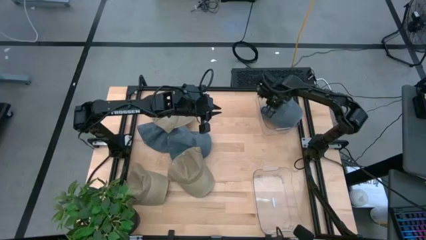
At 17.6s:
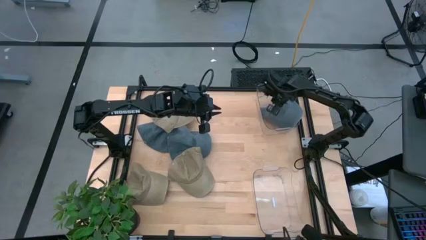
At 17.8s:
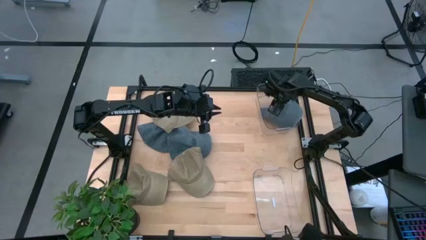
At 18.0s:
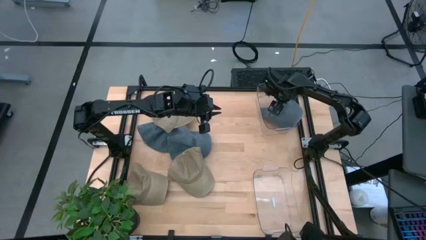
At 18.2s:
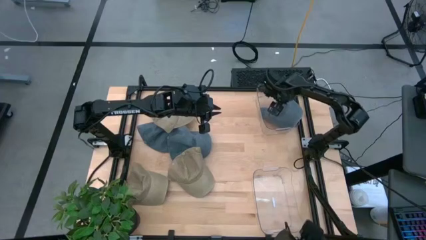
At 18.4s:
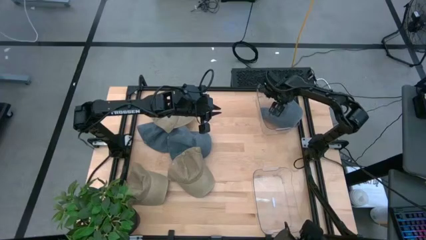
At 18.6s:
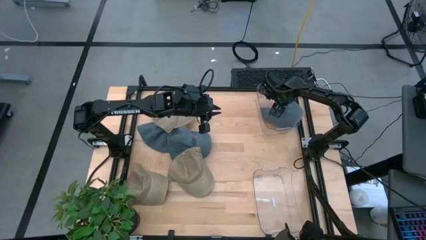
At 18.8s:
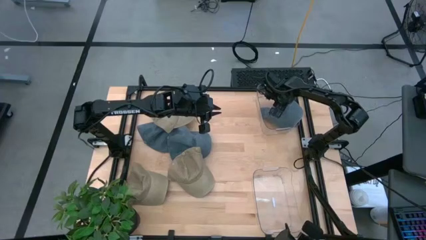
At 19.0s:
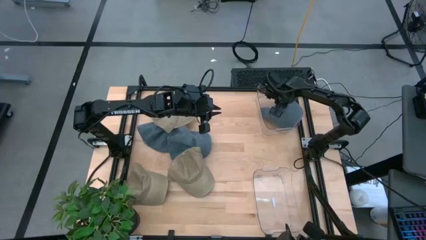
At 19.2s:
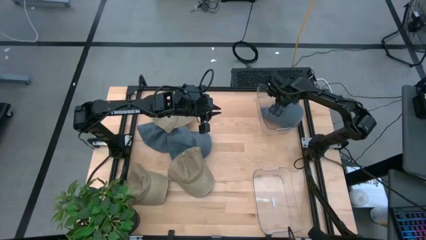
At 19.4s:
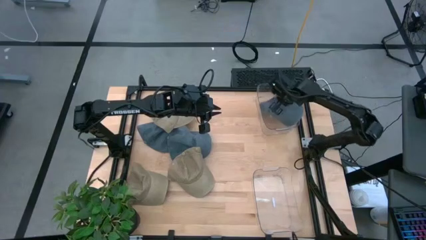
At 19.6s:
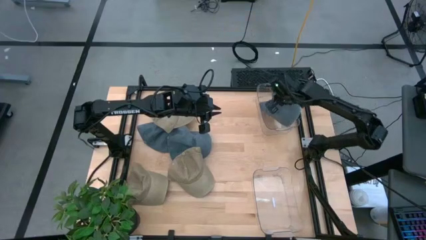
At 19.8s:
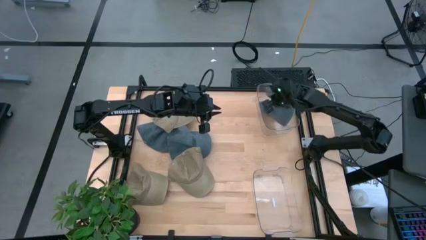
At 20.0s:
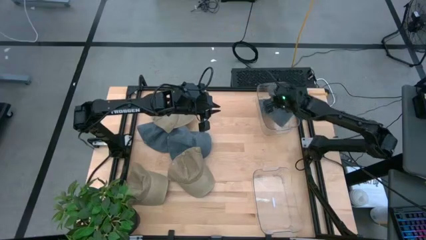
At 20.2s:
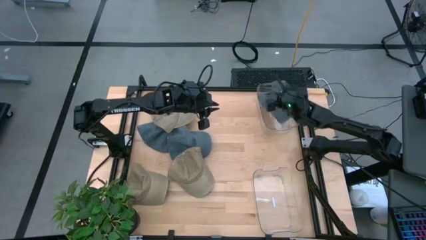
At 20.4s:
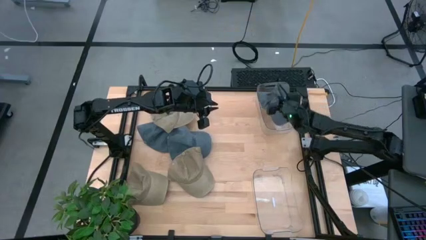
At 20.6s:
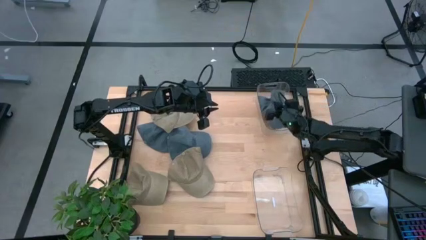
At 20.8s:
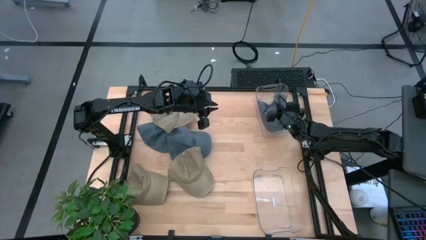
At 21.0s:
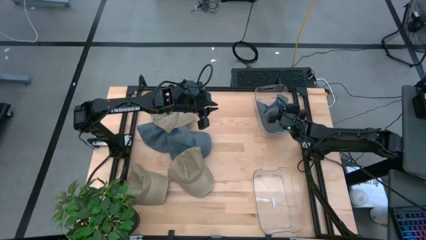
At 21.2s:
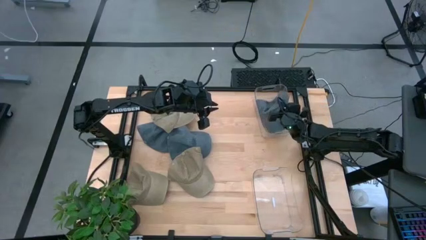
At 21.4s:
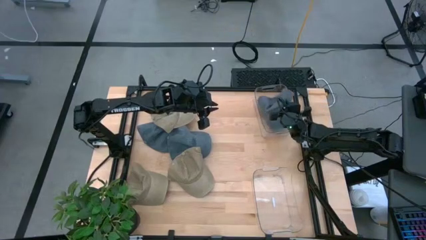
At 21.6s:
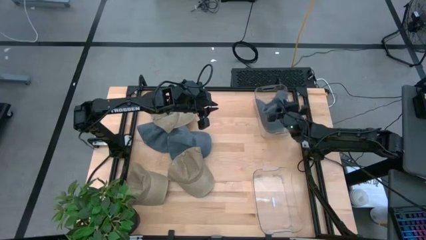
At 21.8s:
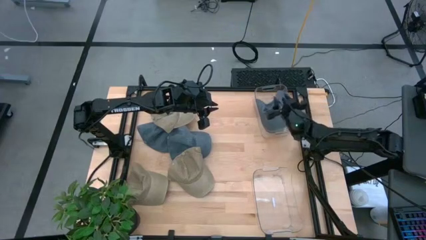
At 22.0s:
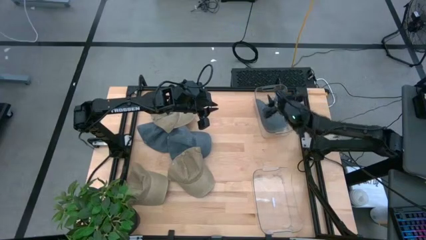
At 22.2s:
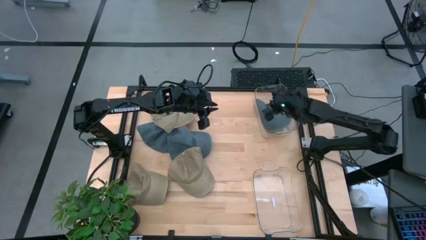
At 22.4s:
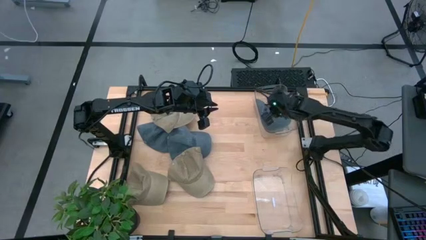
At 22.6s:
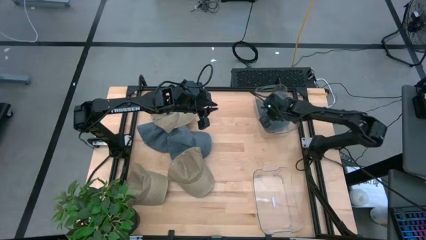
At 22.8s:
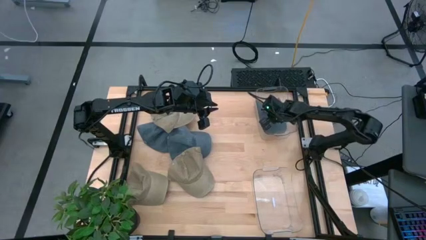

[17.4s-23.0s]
Task: Pick & Place hat
Adjust the blue cap into the top transparent bin

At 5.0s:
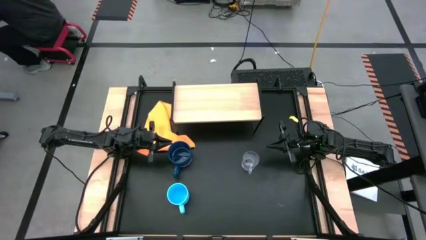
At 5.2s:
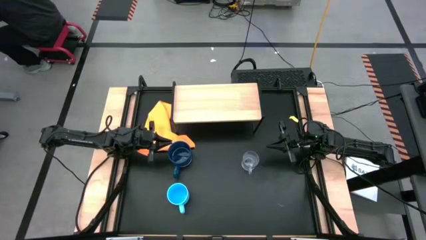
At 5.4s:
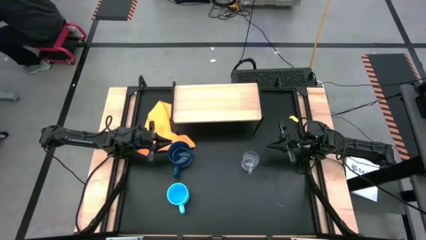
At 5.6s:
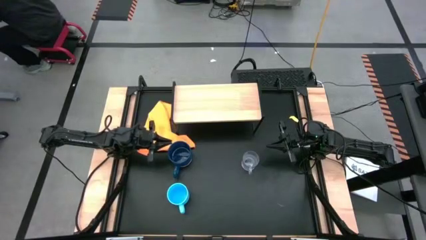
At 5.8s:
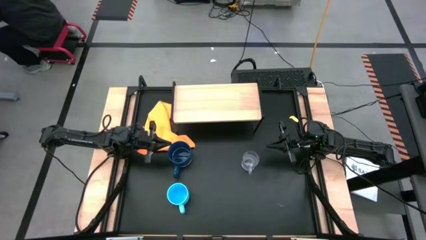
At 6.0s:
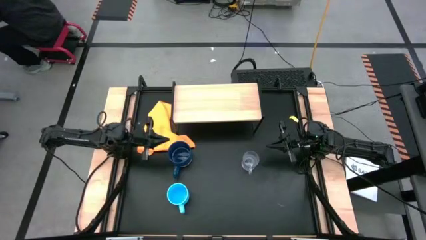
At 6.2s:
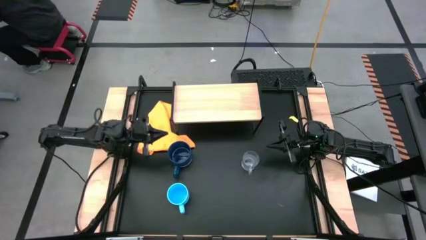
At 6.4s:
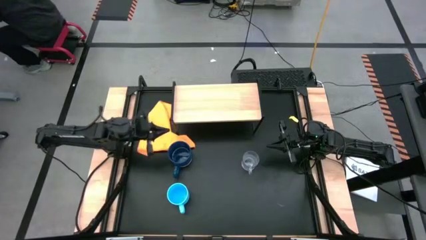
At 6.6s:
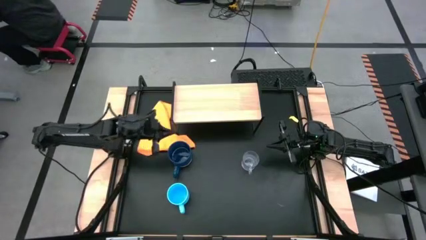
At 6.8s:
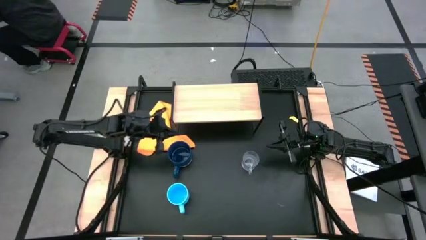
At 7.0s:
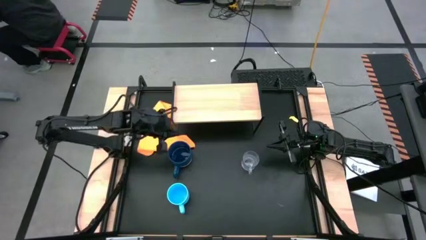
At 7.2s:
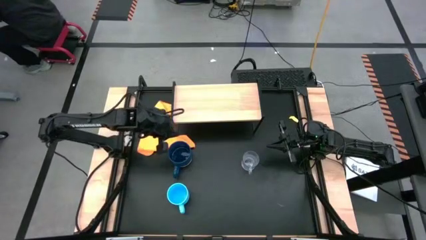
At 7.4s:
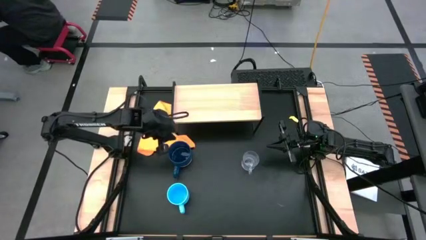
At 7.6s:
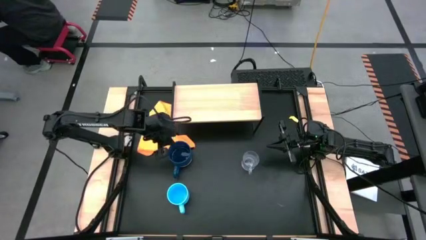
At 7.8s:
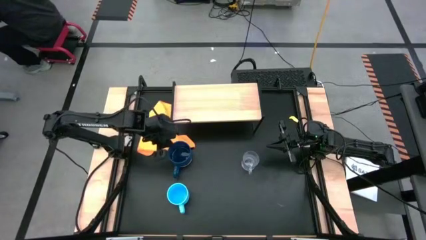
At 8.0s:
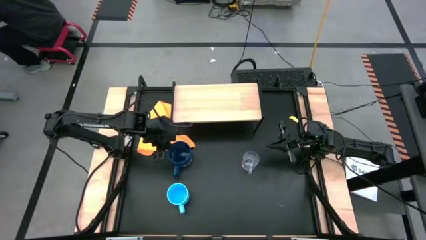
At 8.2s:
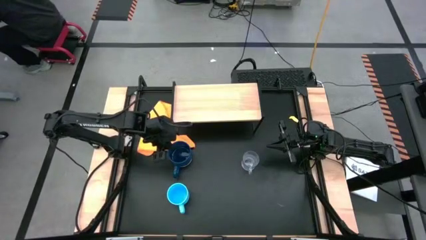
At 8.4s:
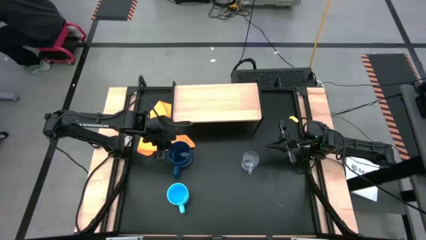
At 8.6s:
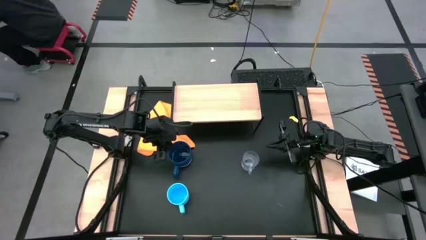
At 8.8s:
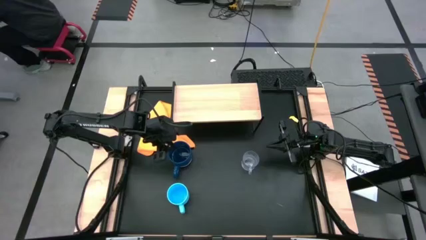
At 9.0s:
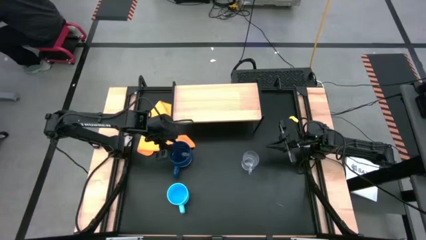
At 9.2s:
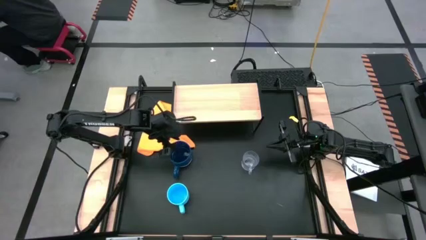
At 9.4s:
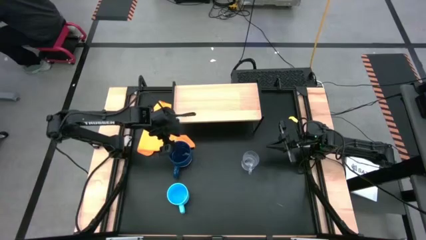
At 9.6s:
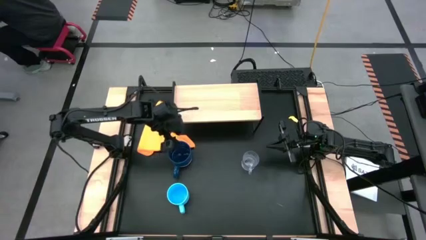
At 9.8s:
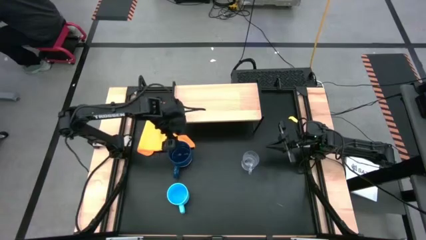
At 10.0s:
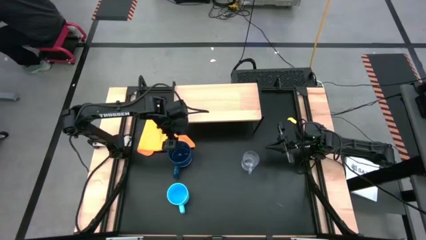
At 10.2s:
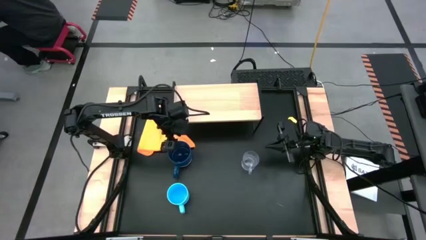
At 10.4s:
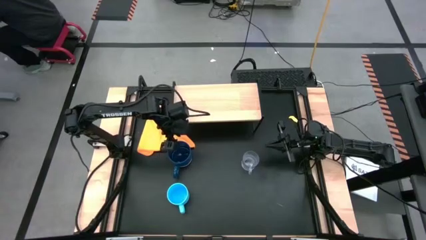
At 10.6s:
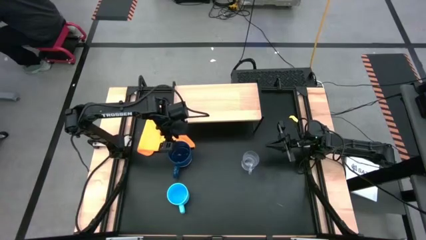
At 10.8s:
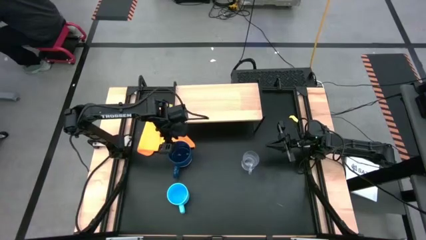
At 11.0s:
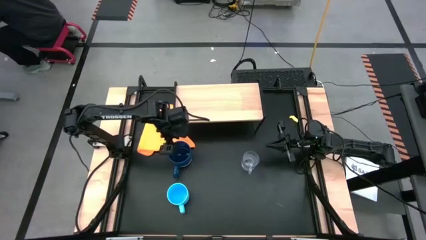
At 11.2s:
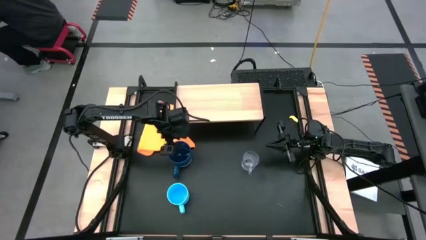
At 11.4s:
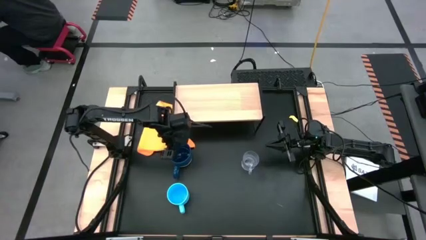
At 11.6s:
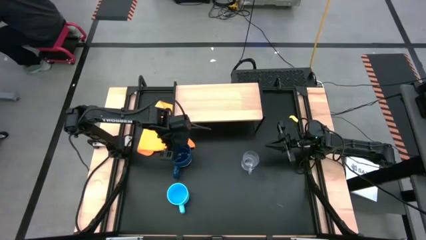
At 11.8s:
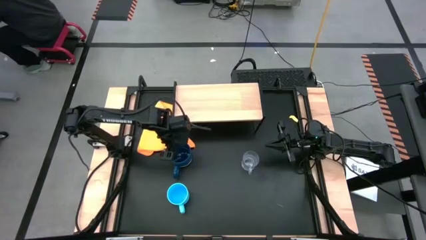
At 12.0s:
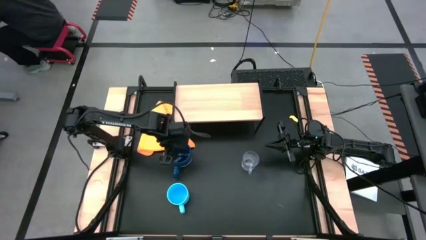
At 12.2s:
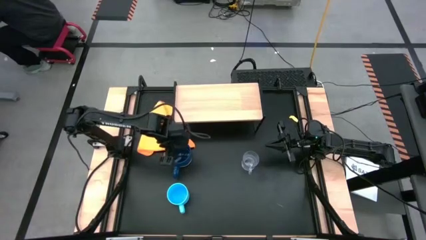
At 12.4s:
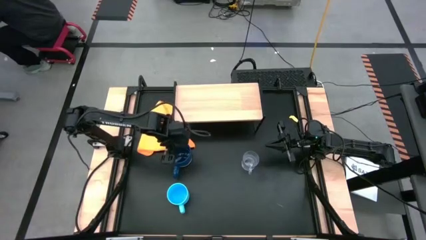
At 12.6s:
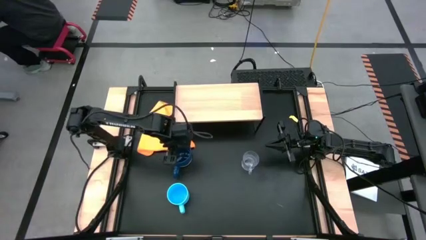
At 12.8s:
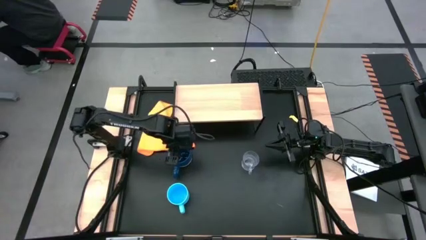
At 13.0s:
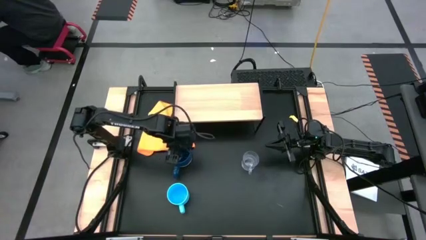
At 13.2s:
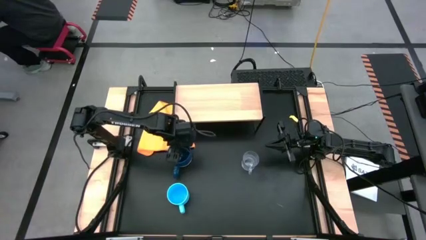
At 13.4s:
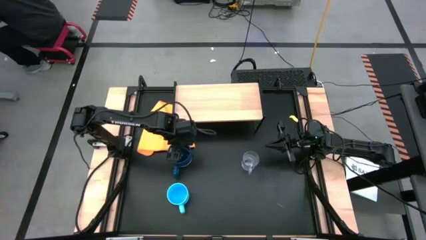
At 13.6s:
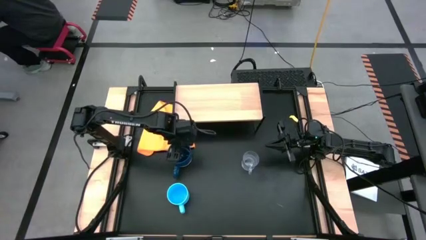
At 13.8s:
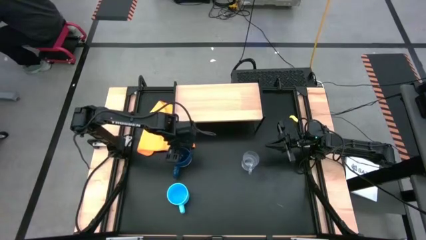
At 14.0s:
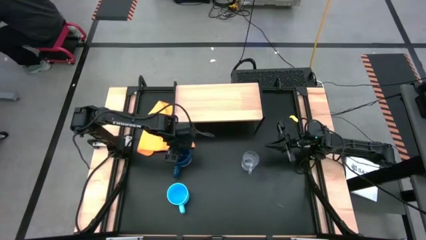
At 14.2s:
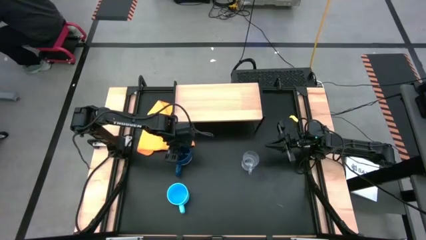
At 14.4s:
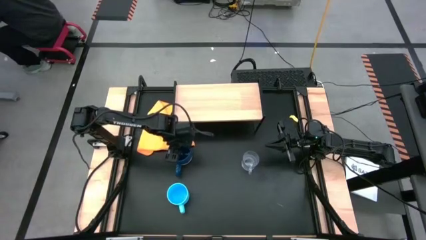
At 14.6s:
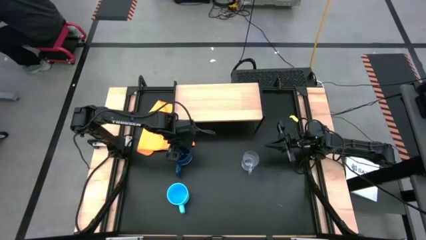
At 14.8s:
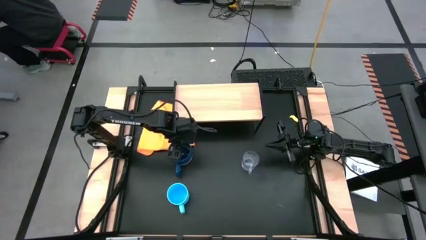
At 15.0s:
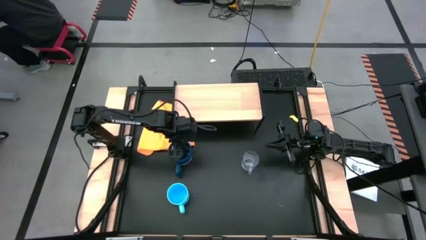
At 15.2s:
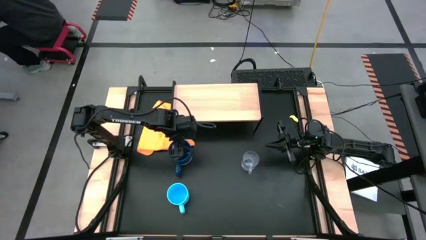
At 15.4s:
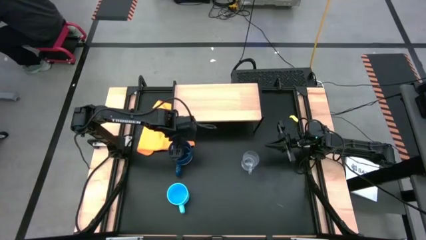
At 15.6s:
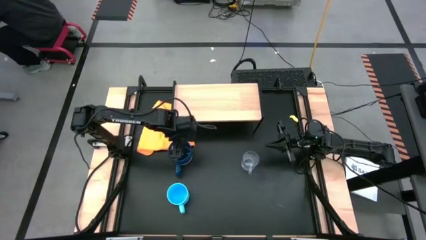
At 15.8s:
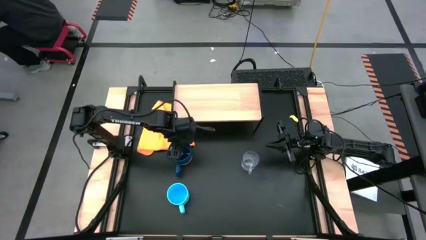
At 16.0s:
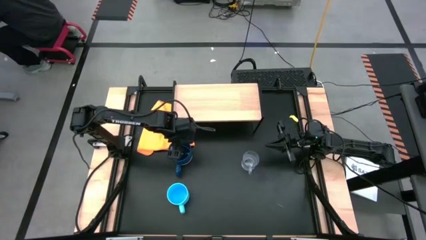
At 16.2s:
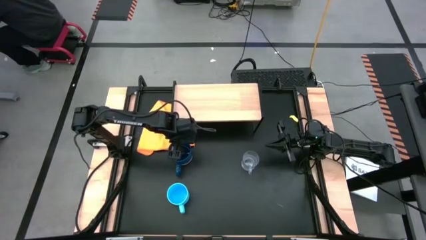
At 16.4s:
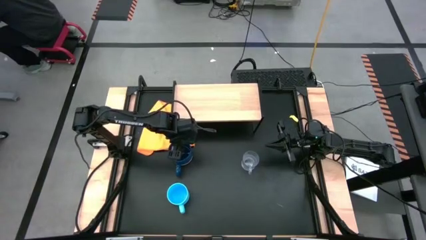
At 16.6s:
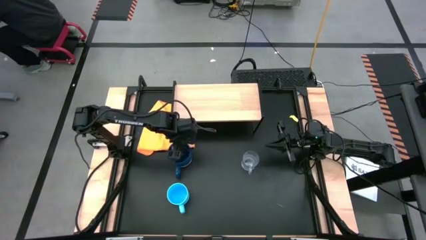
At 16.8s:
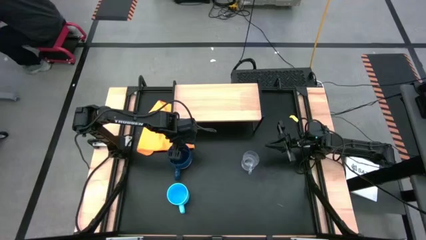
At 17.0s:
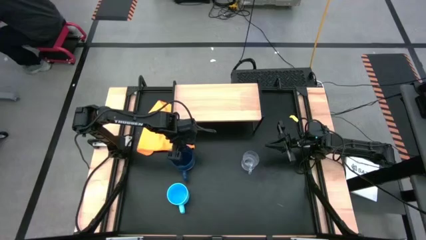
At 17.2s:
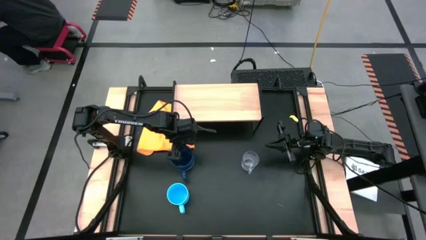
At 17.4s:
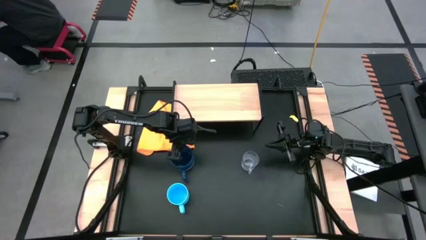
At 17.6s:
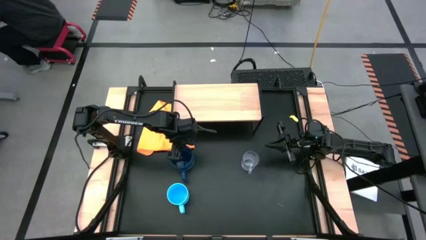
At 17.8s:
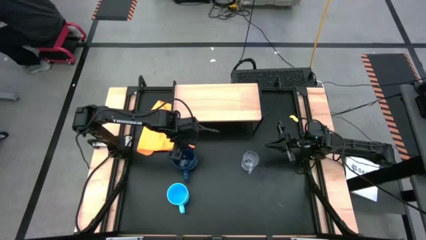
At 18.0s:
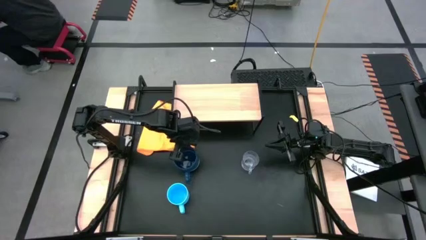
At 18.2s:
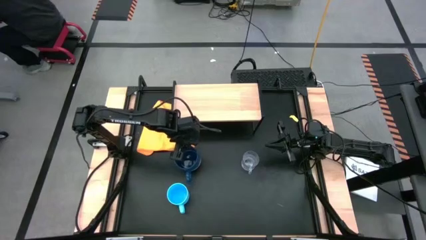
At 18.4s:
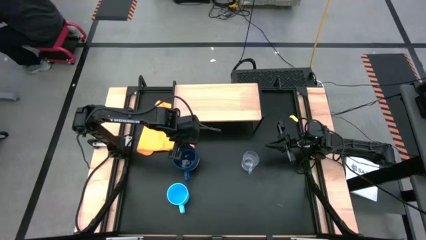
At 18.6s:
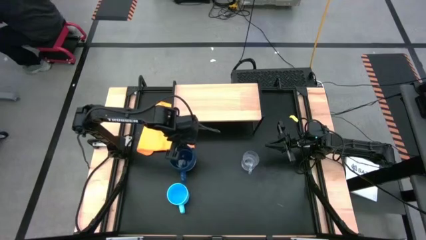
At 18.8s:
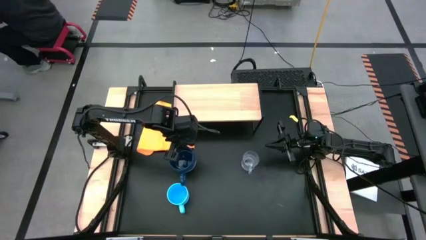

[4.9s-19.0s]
Task: Stack small to large cups/mugs on shelf
Put the dark blue mug on the shelf
